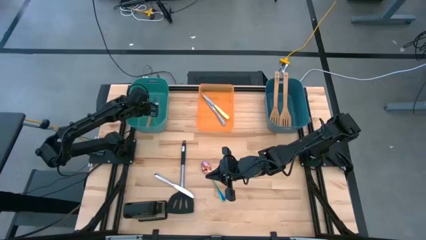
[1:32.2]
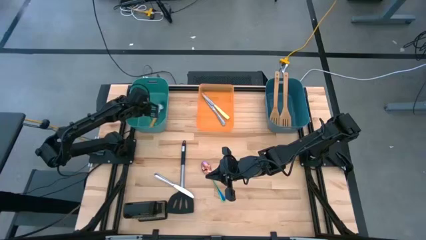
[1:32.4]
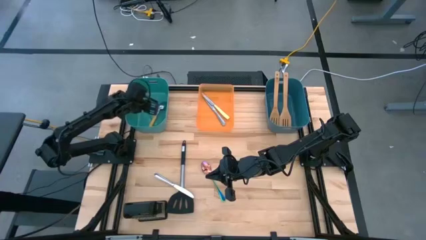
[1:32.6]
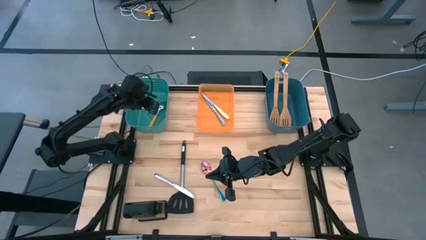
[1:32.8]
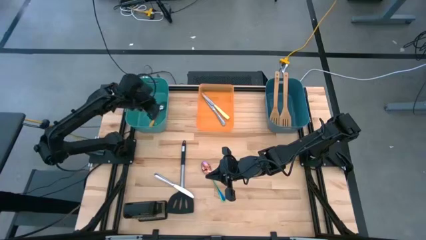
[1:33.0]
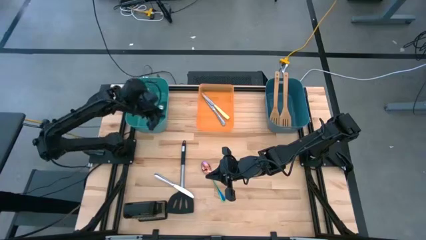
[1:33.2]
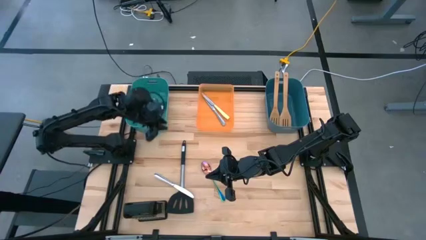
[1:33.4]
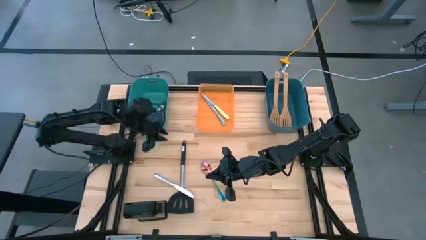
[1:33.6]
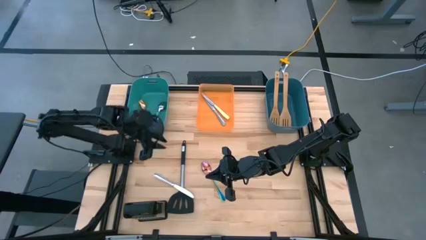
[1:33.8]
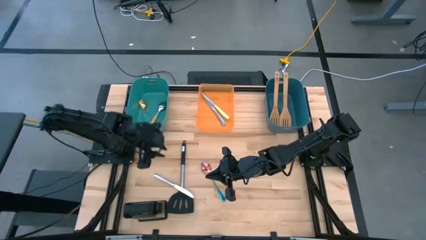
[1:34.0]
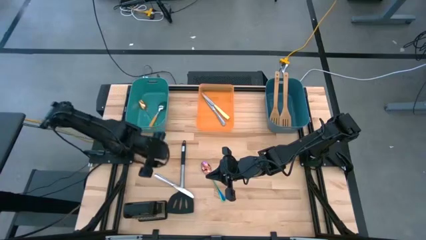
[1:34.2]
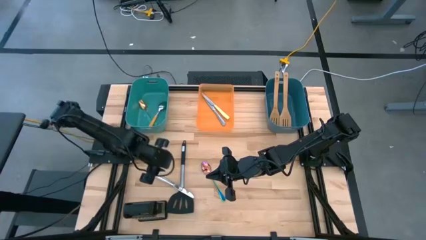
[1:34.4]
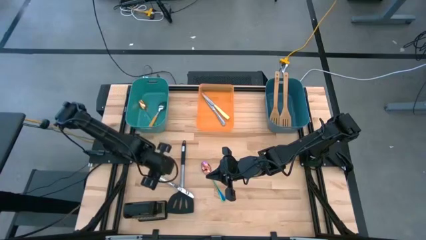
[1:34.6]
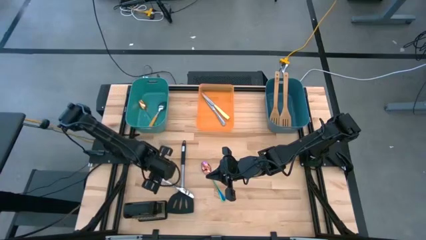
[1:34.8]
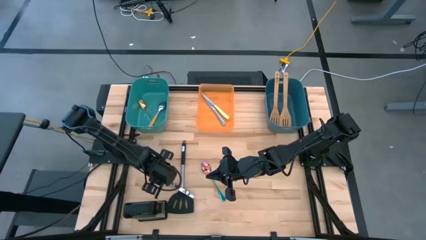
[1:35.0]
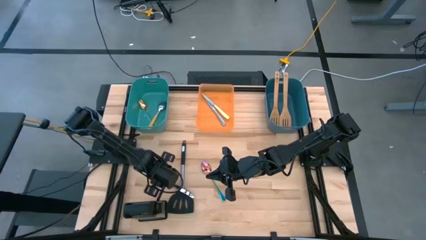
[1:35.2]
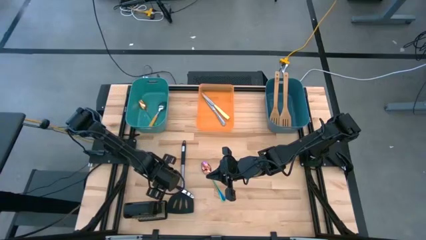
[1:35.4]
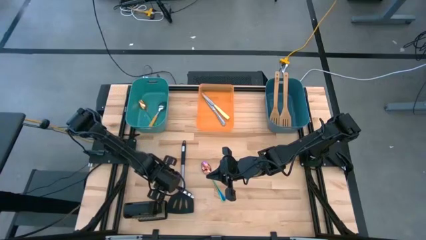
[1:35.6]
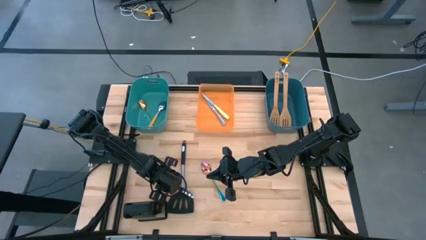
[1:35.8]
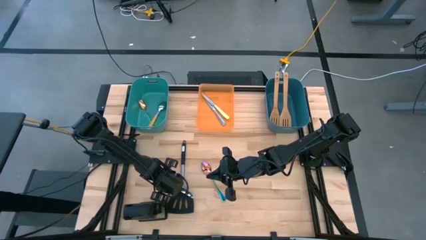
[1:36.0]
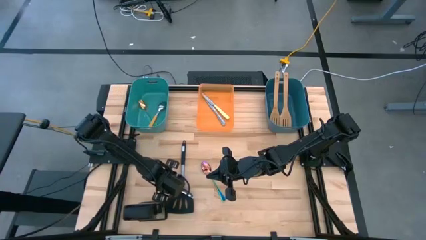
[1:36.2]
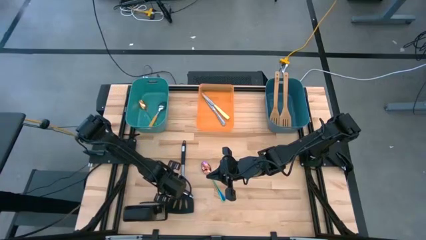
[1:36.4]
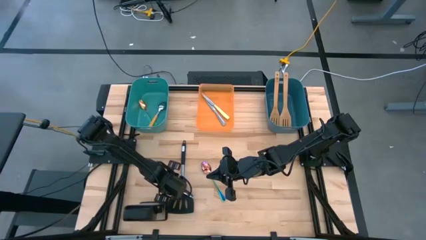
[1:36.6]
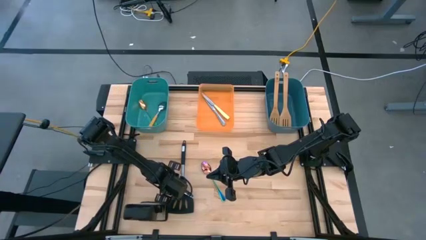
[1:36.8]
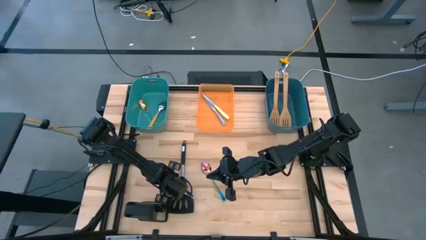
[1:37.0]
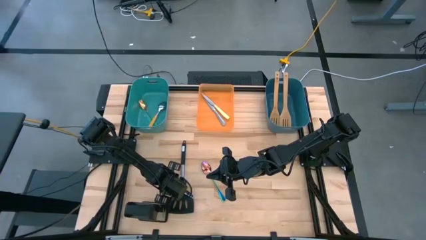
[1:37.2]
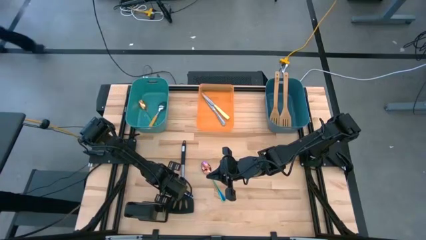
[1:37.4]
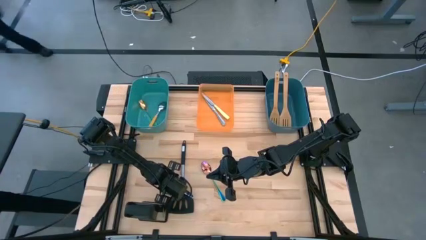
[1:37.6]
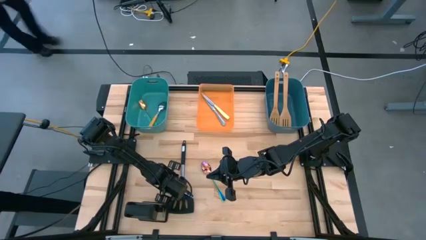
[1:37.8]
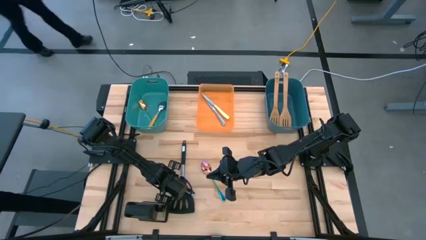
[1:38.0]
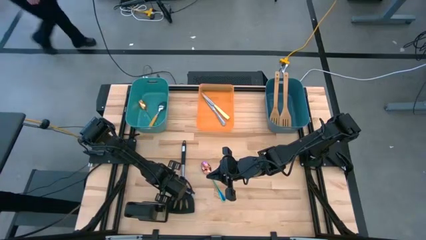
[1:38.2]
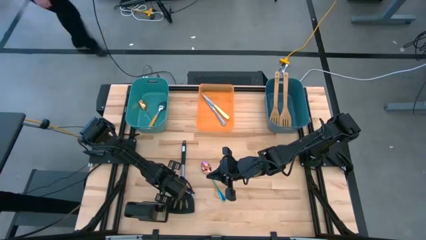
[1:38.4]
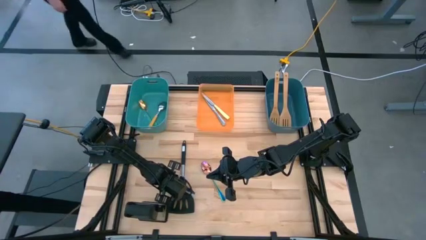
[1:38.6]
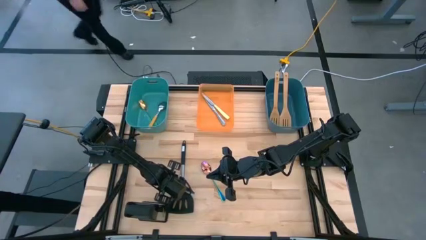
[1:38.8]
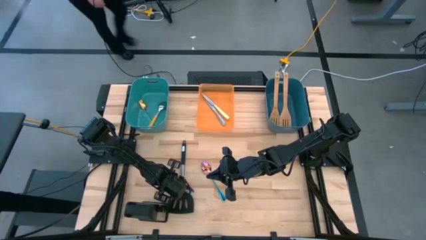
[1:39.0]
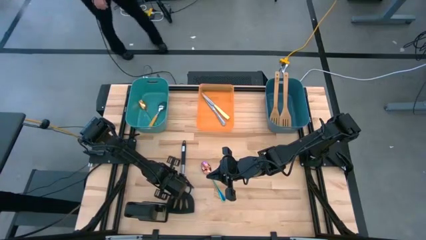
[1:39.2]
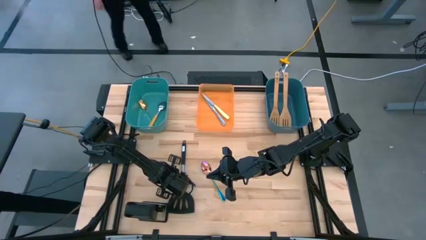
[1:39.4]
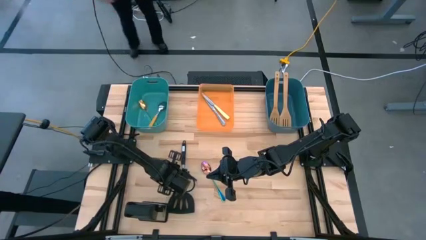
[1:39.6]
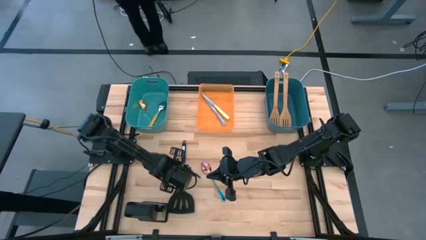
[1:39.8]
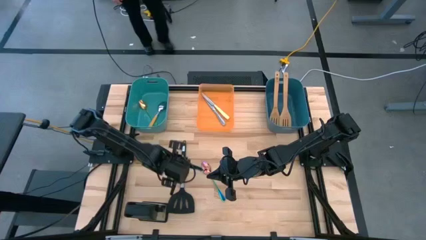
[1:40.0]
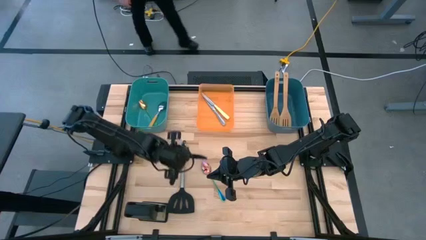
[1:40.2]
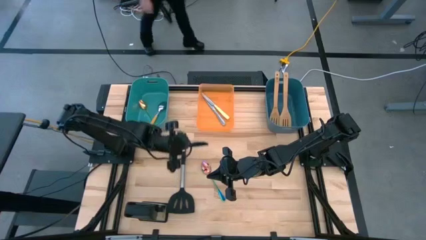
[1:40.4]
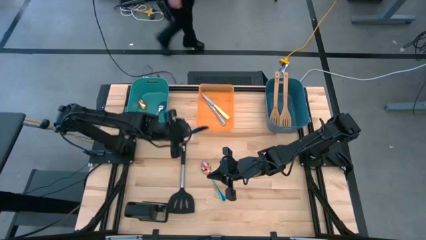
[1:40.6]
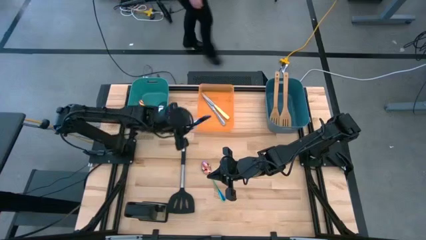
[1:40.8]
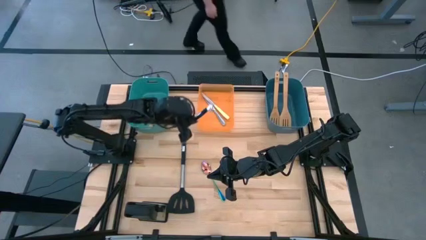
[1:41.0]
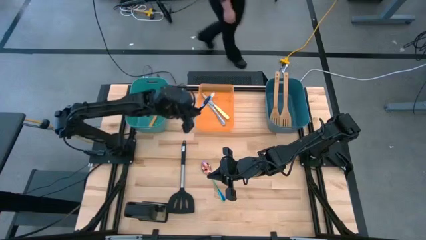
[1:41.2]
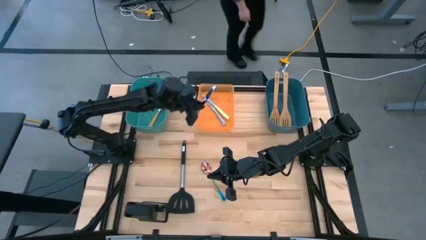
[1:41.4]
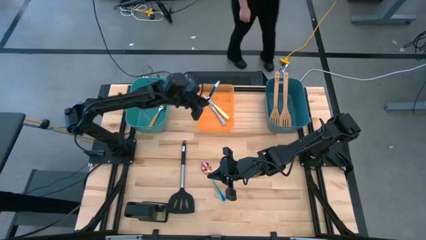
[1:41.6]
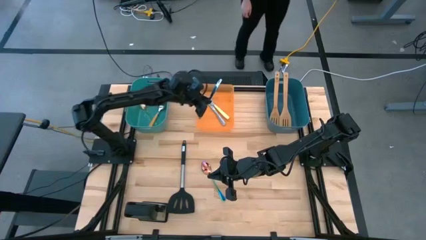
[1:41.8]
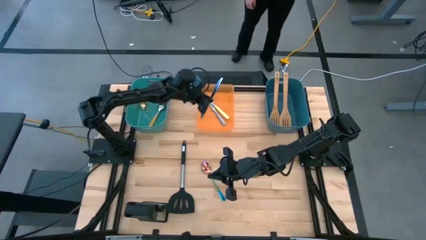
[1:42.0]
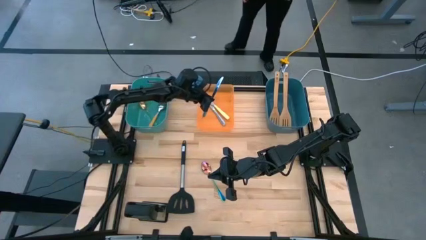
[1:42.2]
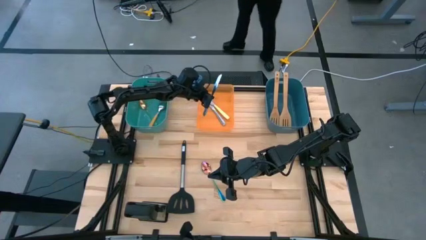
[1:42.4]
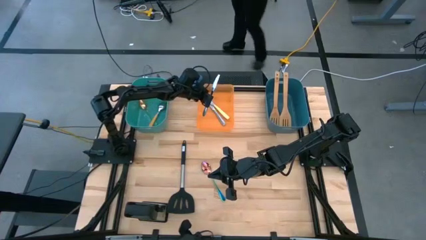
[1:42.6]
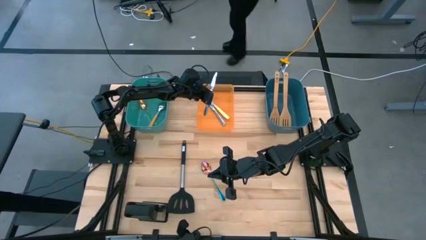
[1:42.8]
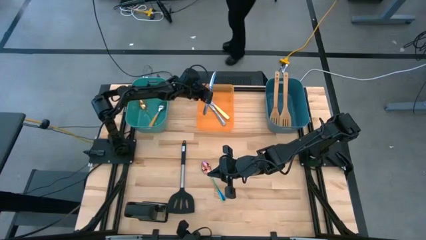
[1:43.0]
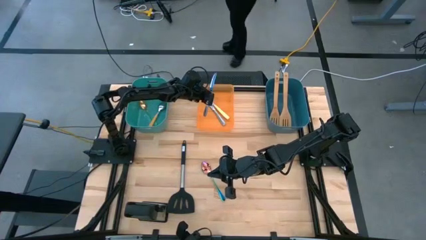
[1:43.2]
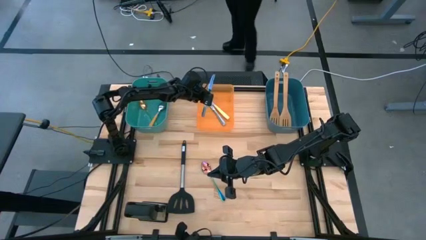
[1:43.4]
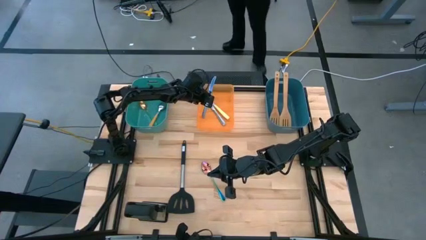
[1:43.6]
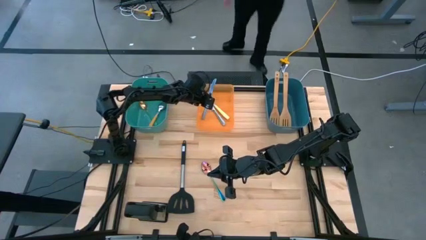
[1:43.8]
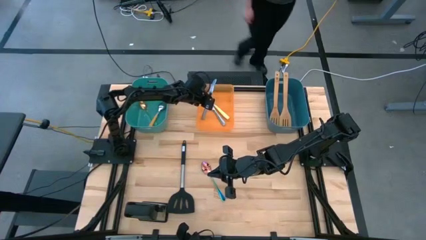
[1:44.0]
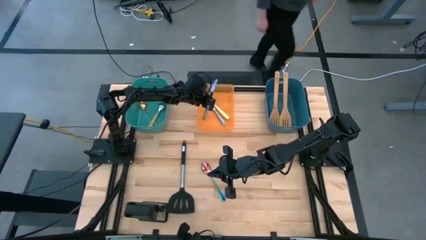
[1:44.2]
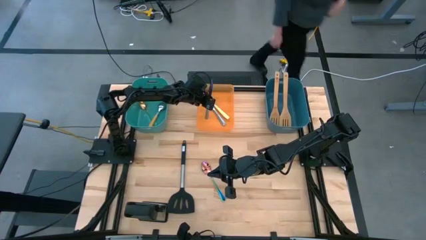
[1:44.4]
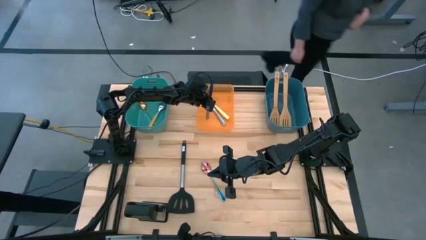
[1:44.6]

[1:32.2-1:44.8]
Task: Pick & Place Kitchen Items
Put the silver knife into the orange bin
